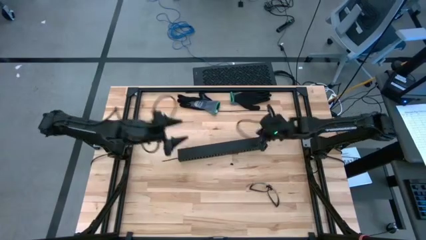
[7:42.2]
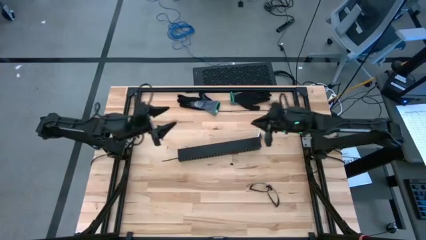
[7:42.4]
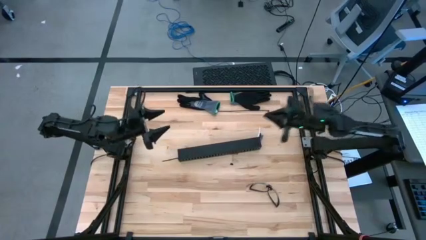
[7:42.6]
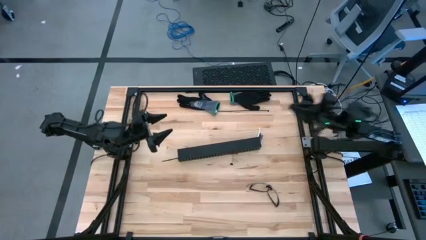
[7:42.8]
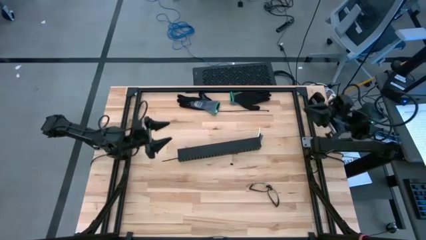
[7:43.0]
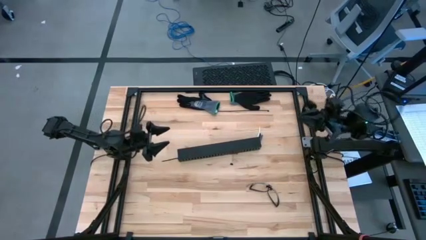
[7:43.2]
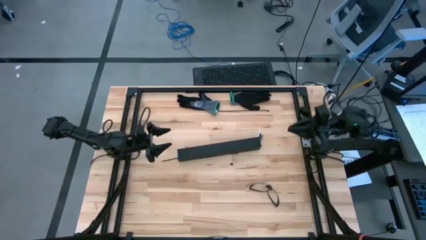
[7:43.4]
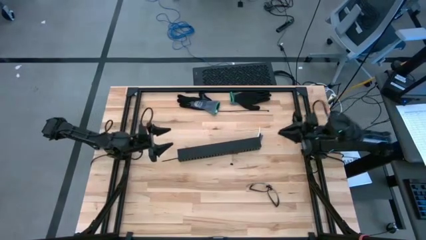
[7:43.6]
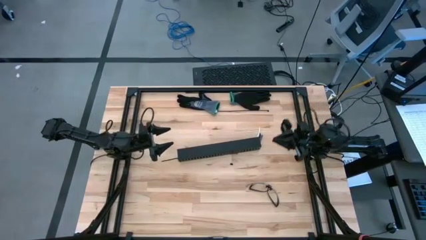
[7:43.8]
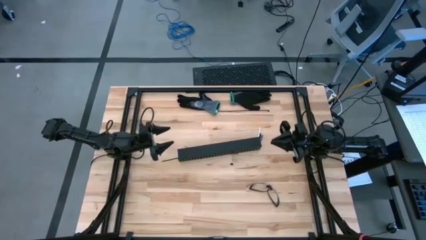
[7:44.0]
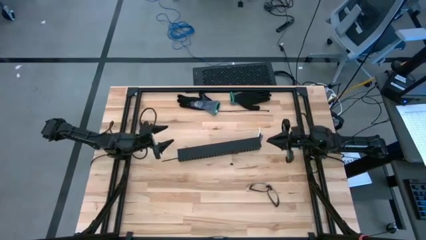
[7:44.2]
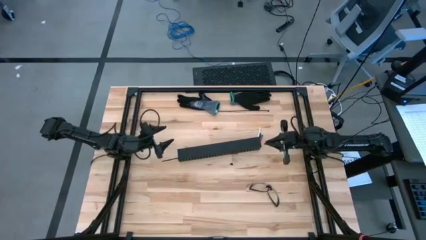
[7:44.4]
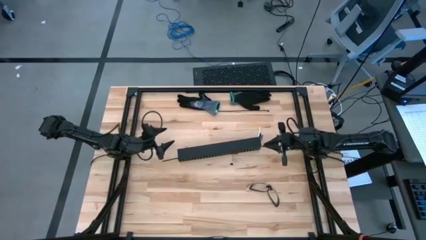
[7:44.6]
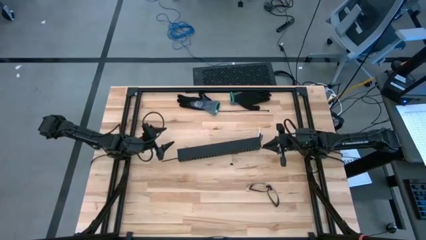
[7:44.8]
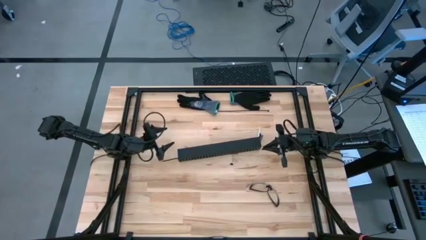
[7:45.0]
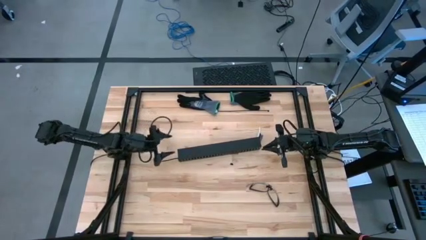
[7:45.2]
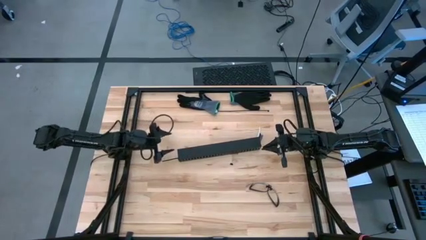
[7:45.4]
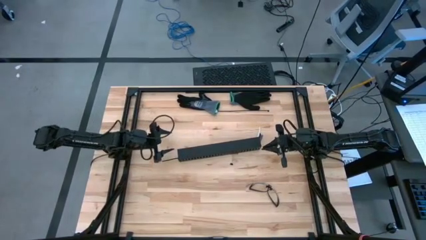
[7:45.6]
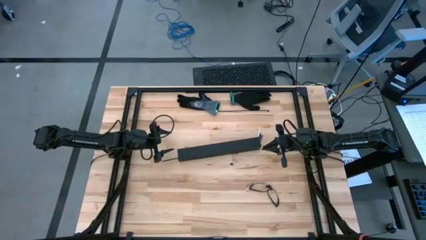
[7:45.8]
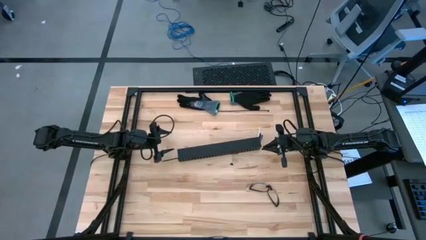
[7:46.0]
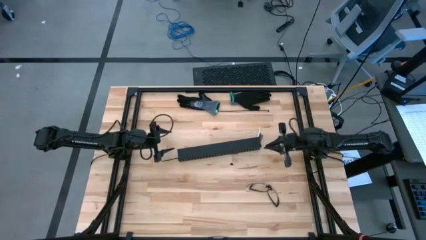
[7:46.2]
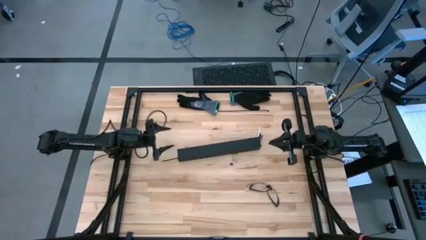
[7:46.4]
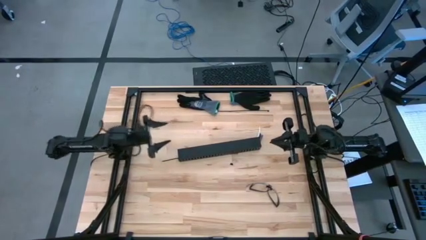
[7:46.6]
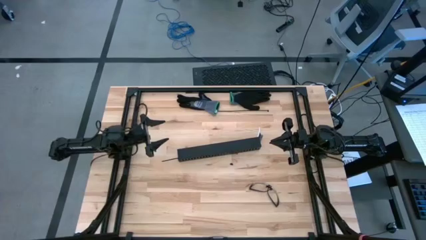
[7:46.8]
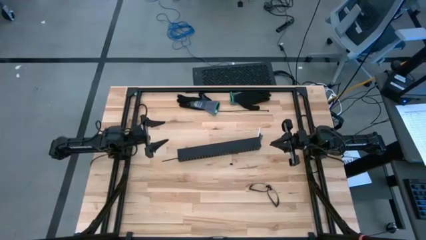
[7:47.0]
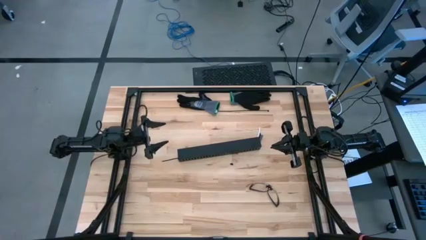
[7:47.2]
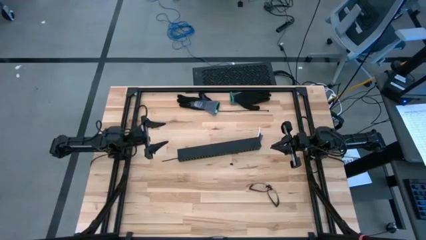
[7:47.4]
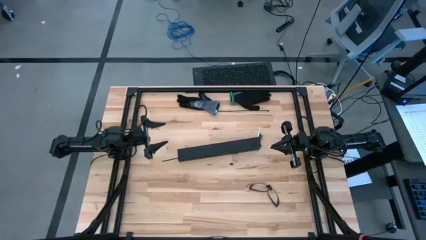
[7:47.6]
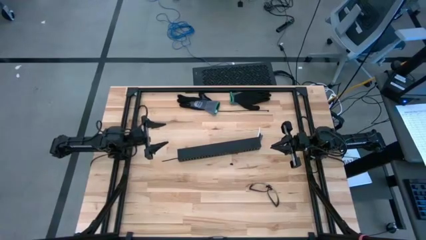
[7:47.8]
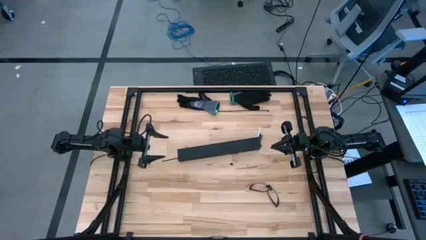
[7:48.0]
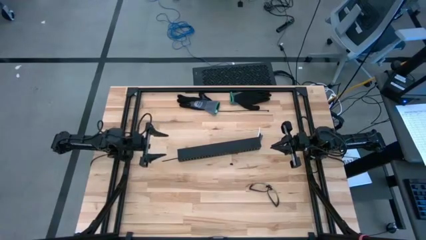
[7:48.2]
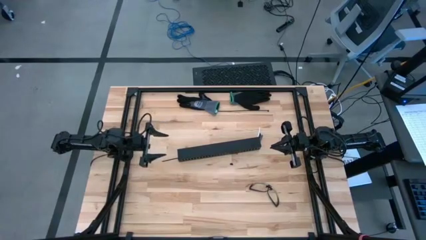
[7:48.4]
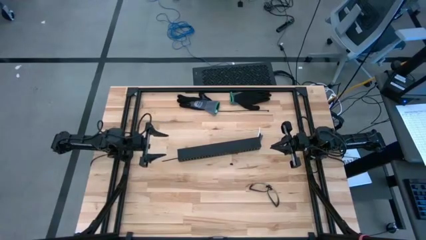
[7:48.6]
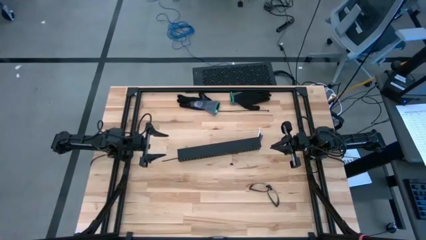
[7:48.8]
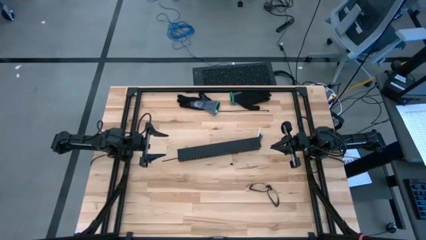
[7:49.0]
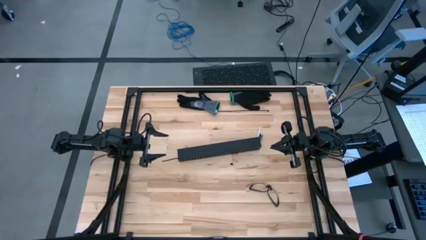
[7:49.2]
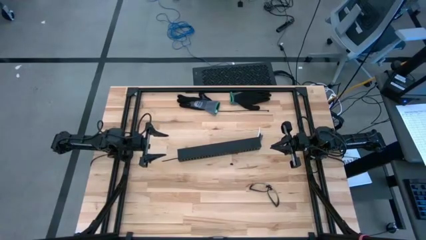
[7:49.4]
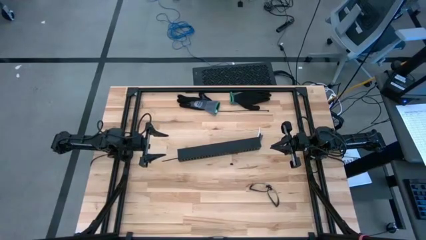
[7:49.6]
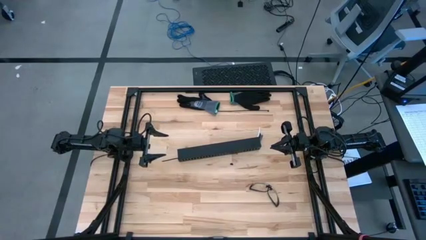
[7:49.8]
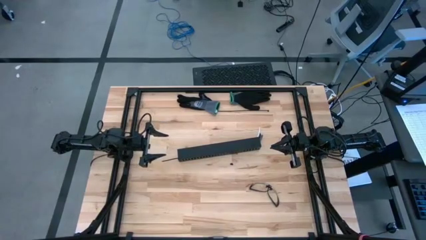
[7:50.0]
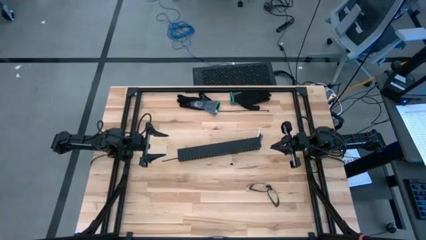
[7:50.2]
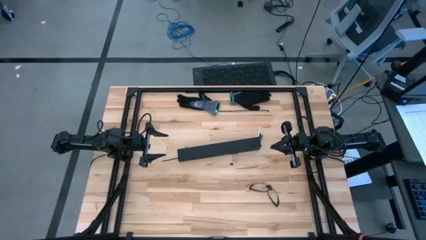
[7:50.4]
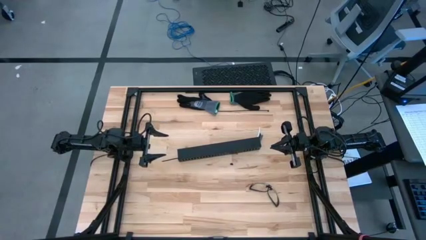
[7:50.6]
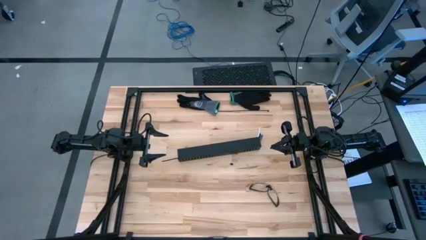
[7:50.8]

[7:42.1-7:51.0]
Task: Ziptie cables
Return to Home Position

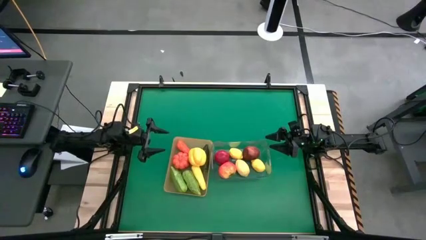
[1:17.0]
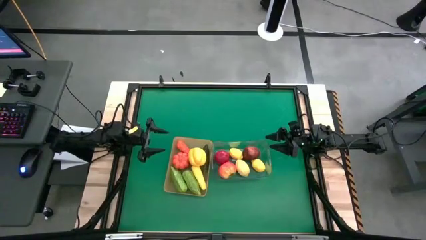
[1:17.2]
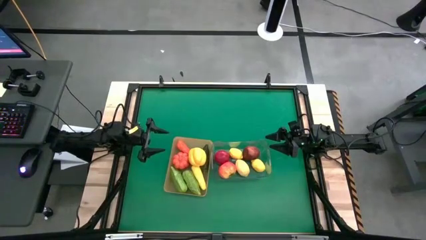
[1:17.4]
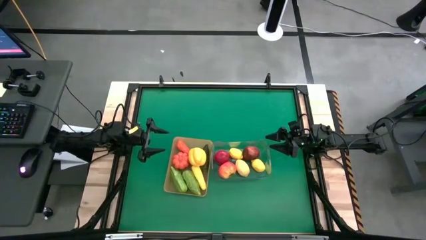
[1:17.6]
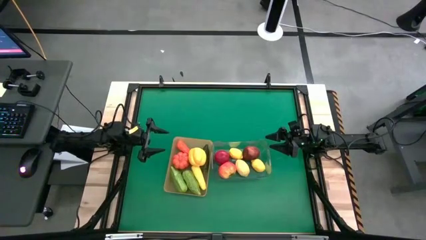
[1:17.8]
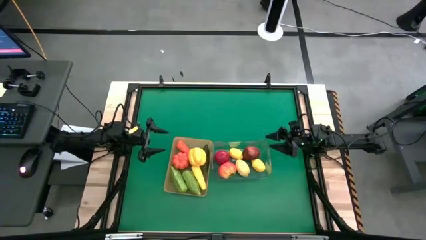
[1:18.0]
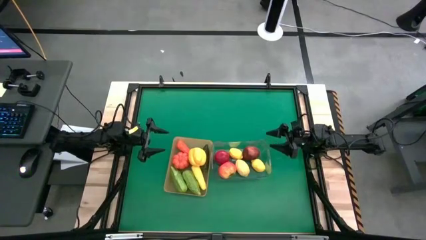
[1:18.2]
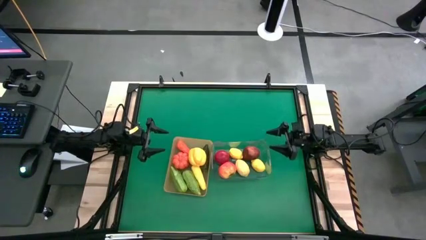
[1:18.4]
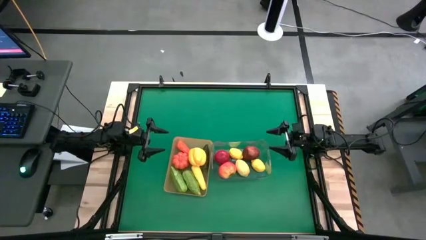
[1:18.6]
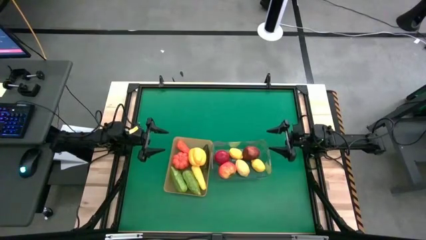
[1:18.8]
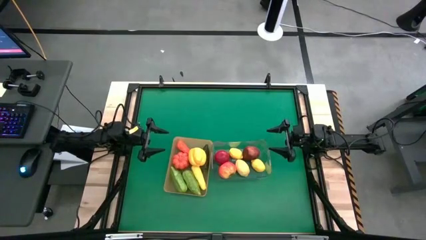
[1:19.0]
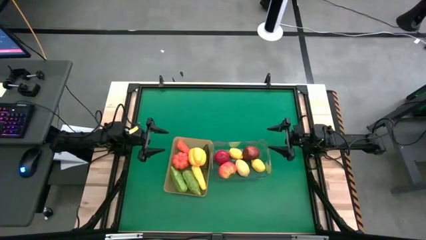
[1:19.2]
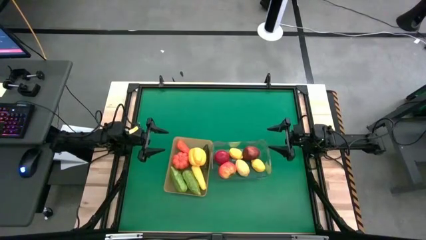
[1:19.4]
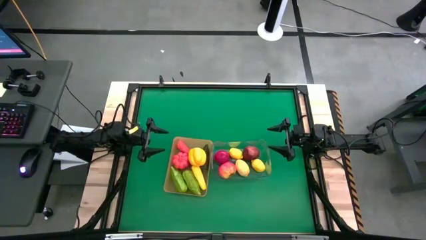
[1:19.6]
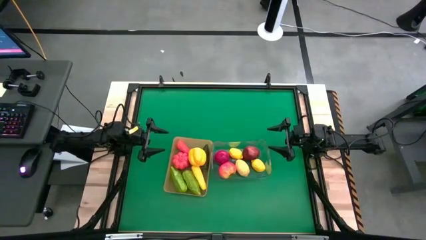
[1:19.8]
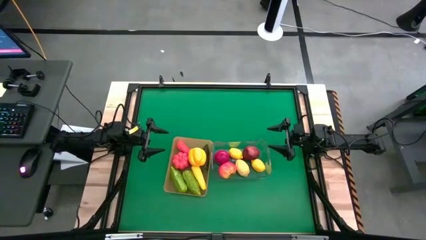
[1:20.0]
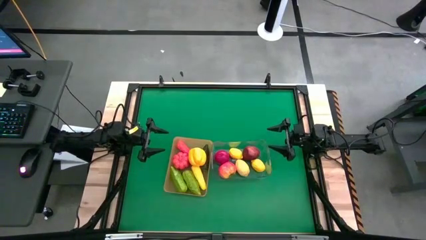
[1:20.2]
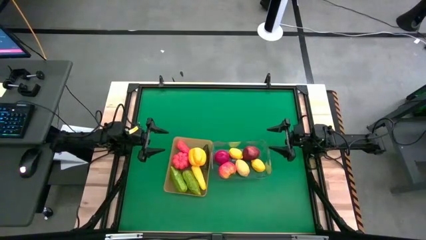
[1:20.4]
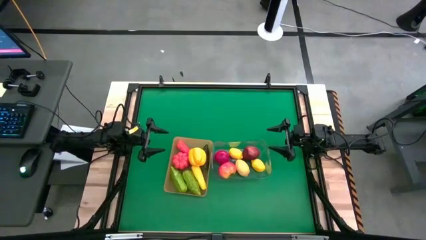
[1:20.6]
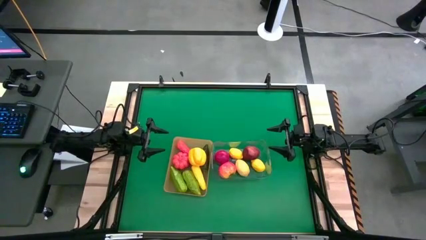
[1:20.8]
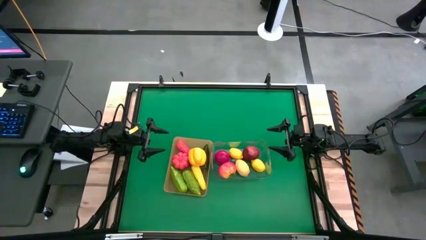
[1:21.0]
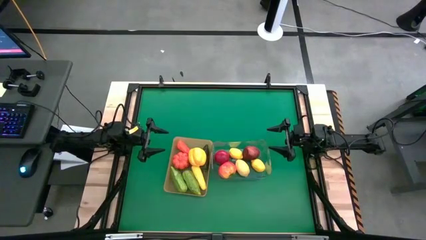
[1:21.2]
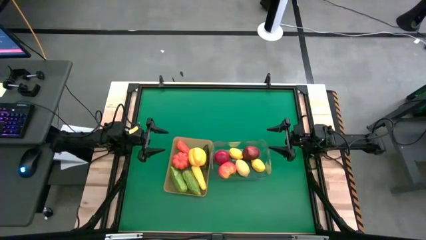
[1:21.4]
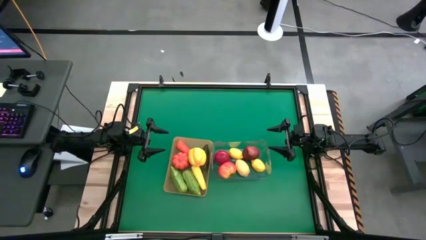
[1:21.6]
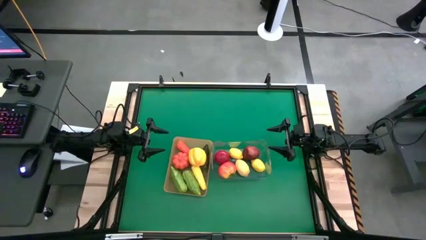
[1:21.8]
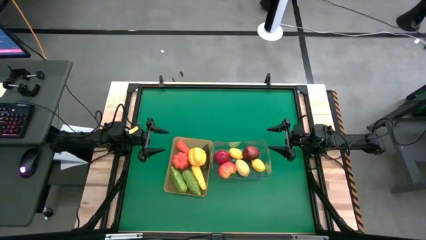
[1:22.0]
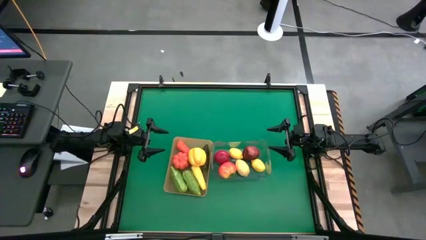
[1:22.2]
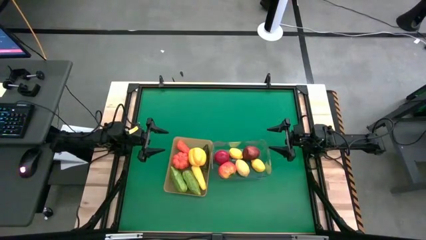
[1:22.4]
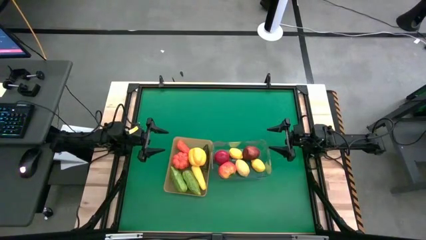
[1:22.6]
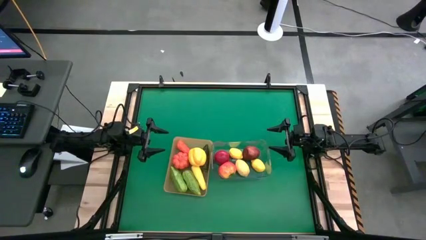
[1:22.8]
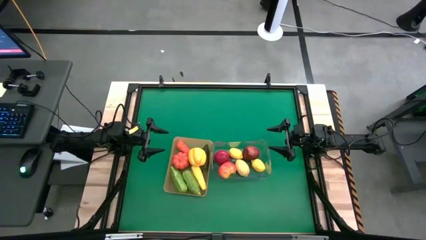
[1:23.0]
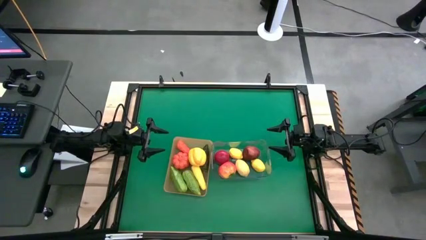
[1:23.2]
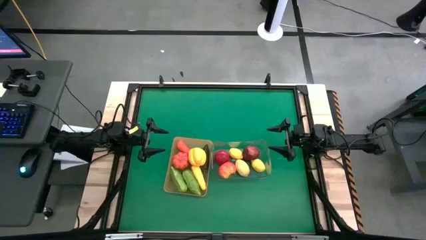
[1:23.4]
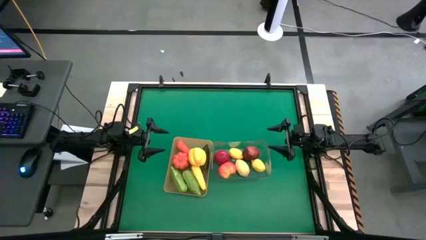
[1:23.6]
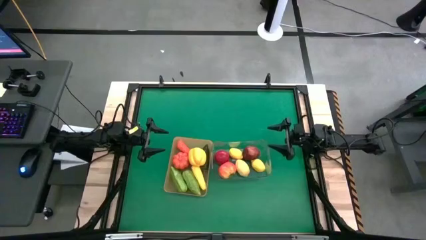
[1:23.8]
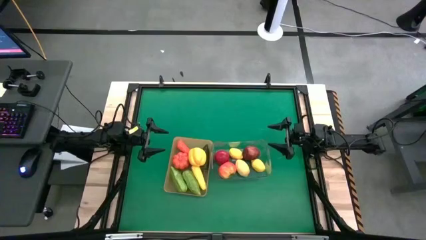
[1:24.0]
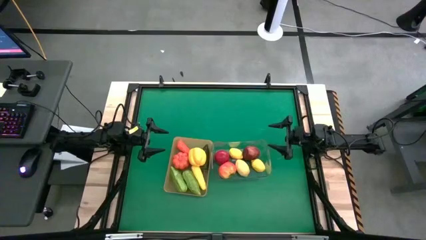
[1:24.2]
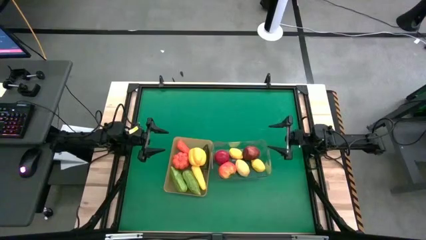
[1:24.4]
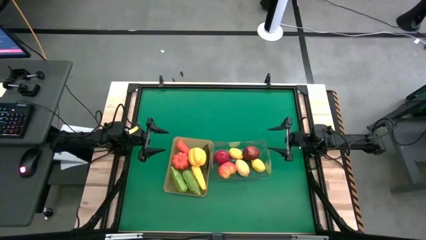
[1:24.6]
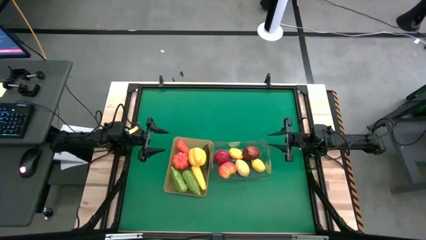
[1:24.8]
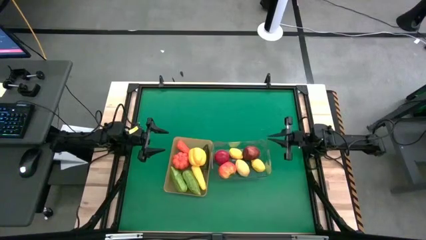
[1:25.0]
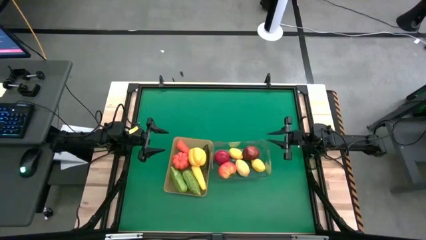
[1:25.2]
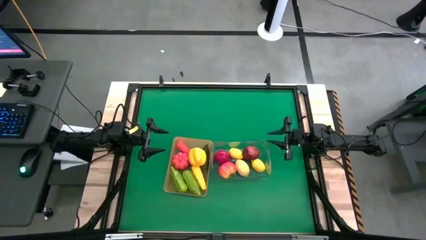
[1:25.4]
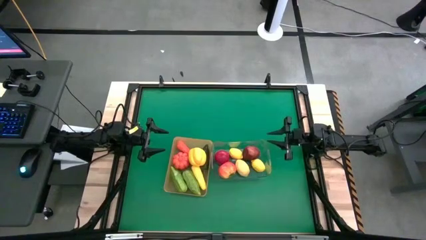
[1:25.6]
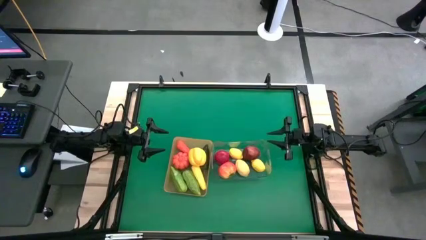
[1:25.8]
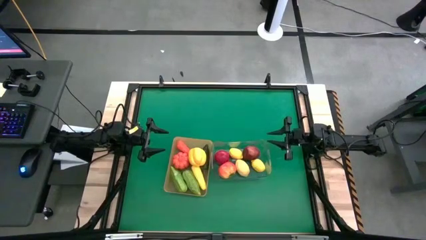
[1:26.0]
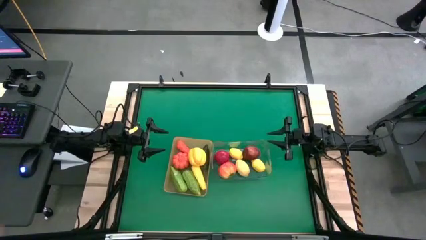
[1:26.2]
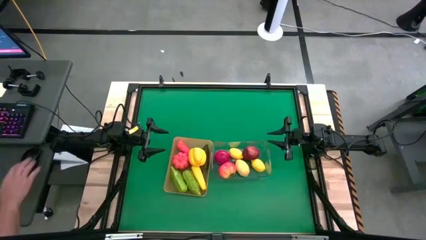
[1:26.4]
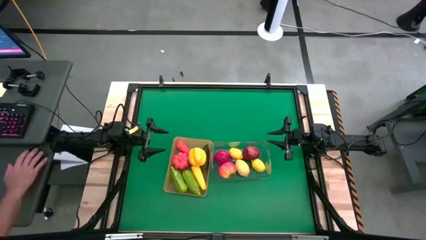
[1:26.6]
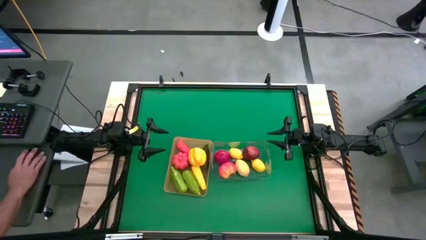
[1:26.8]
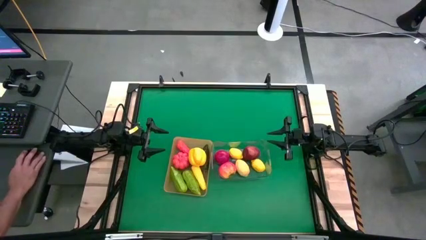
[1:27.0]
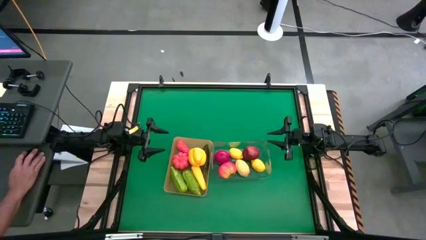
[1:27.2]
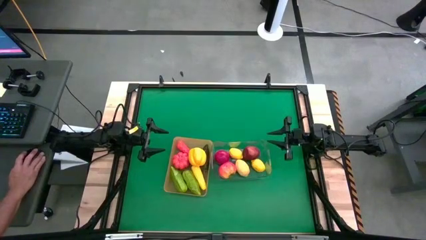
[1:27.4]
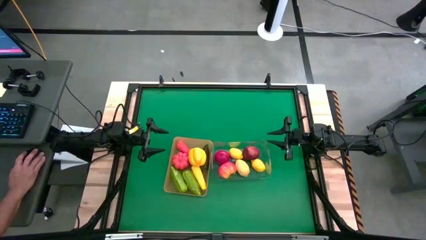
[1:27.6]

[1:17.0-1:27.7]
Task: Sort produce into baskets
Return to Home Position
